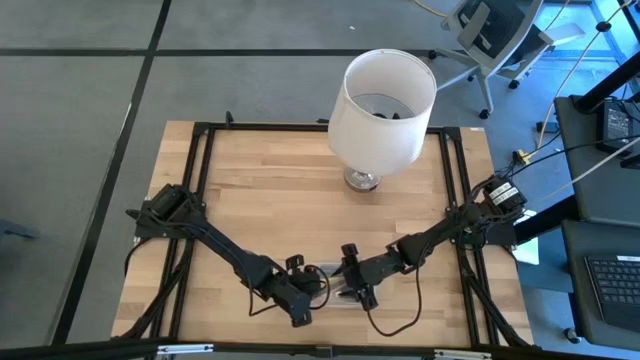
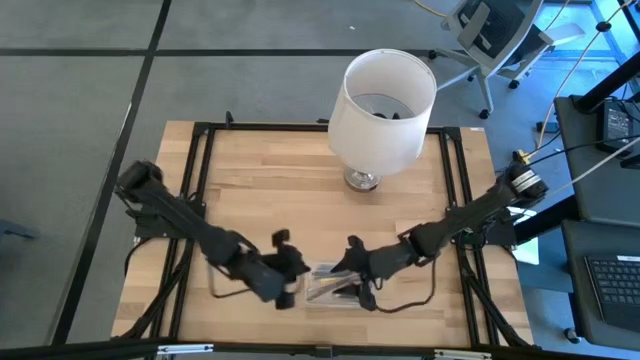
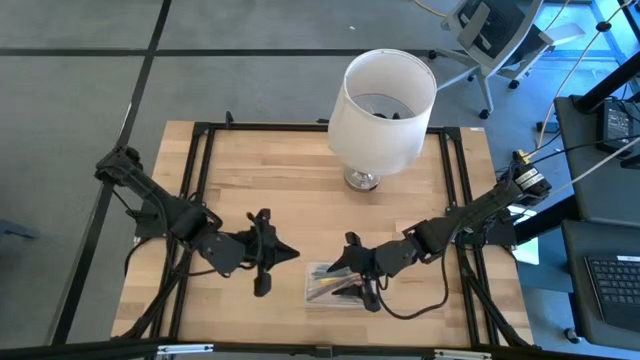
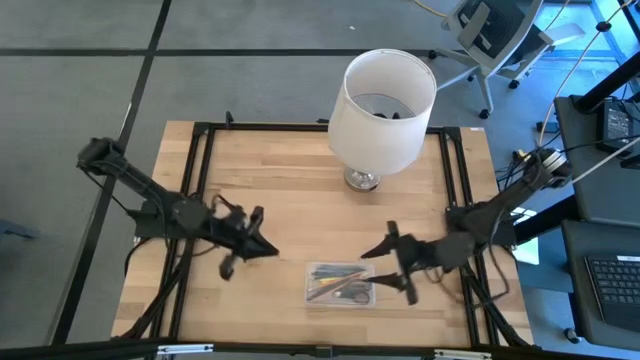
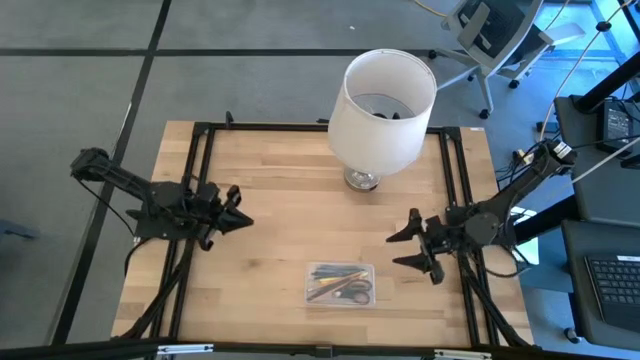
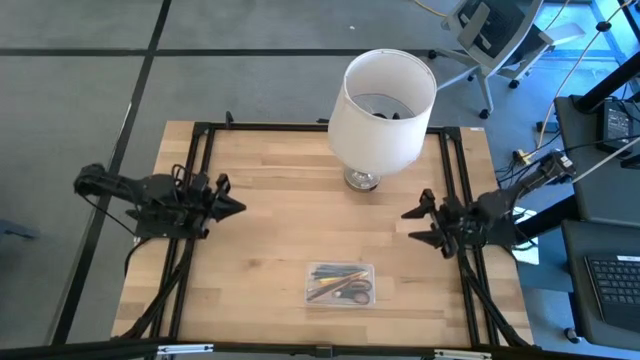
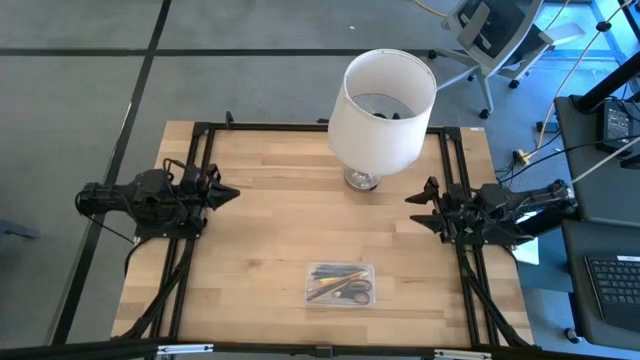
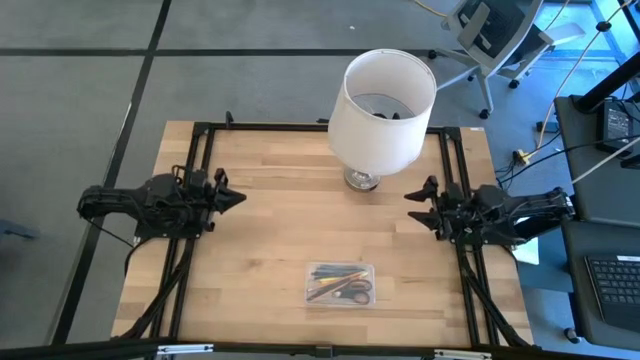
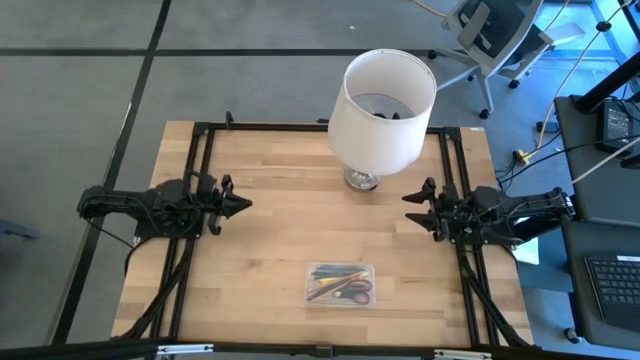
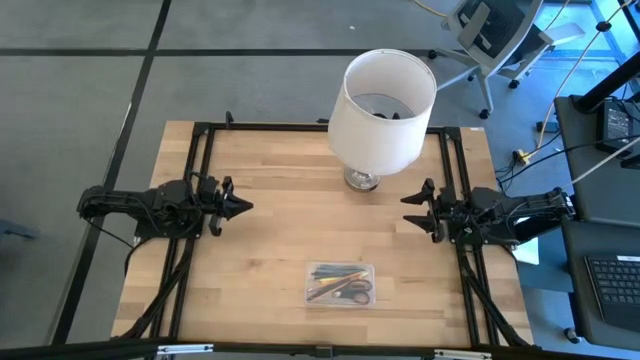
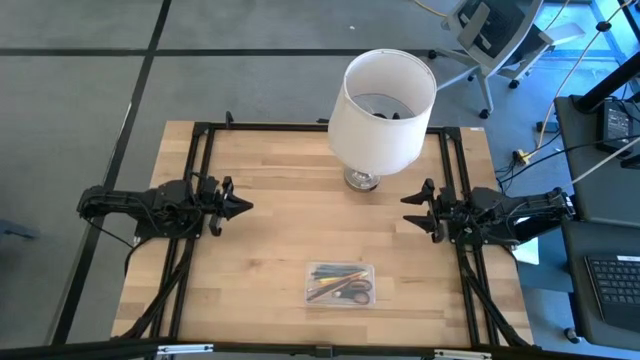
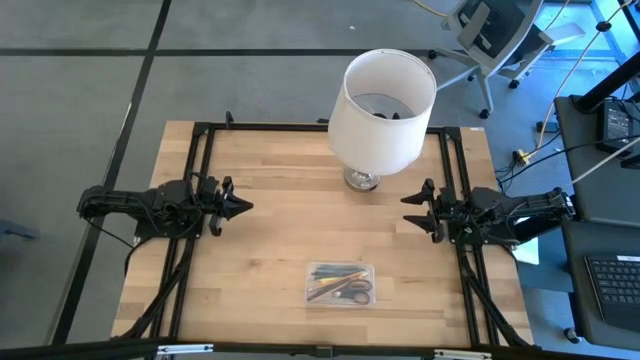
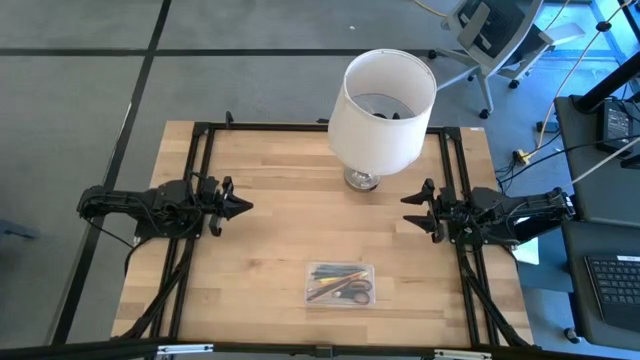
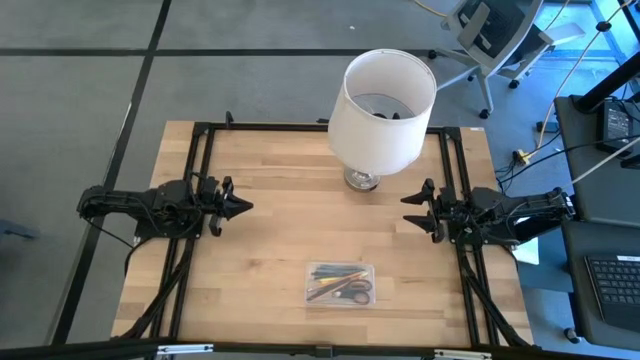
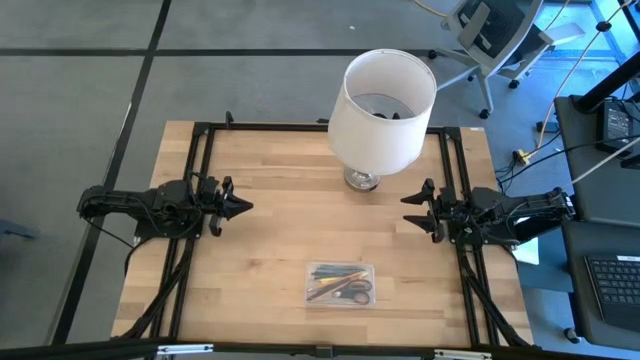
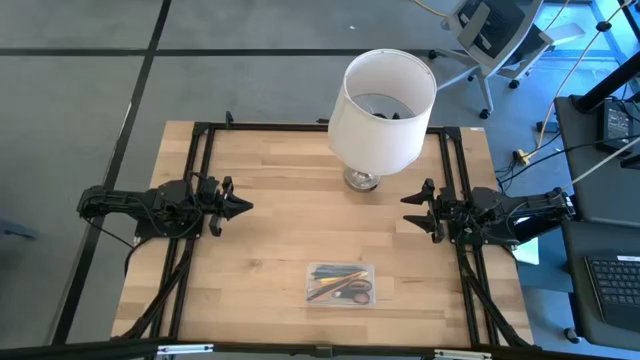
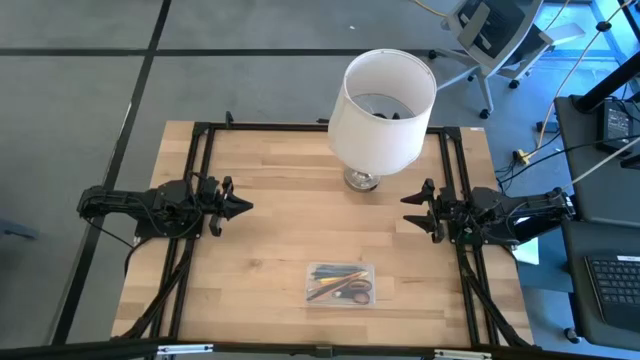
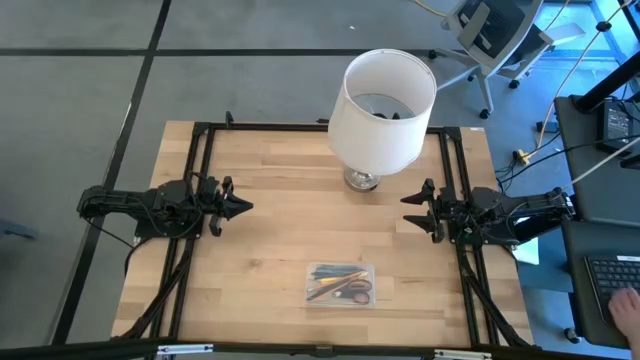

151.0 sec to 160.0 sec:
Task: Pick & place school supplies into a supply box
Return to home position

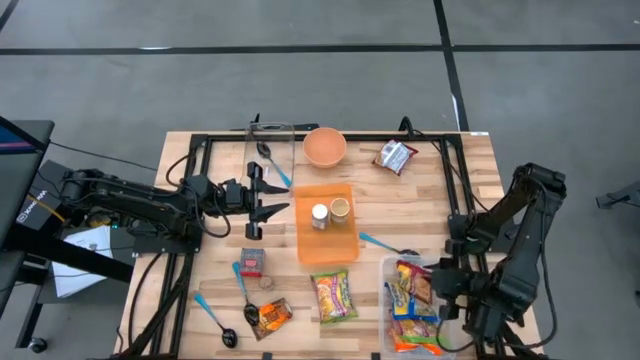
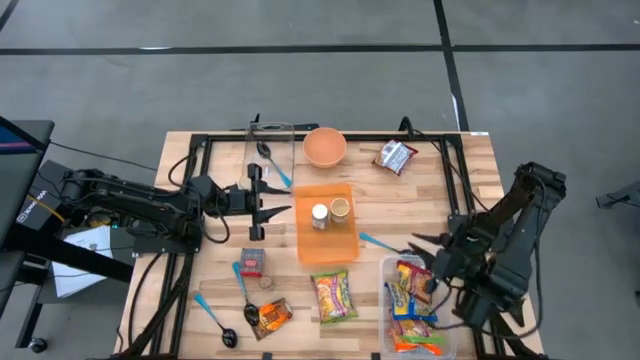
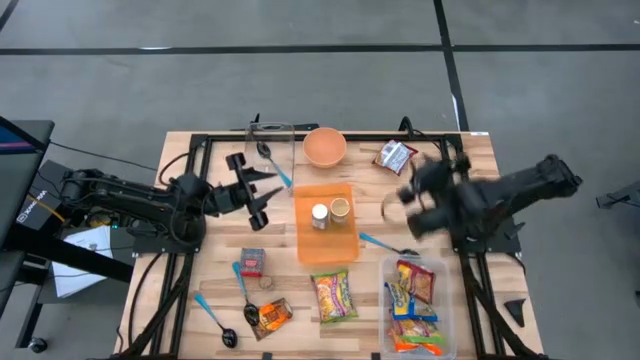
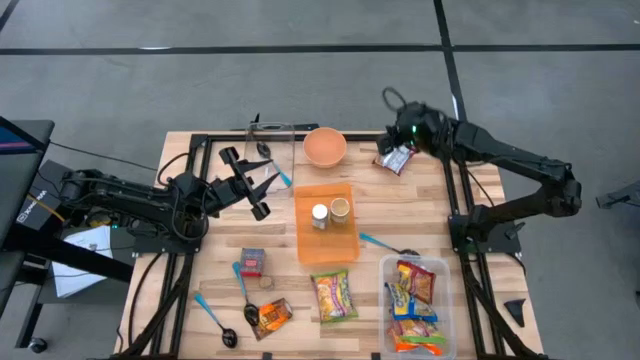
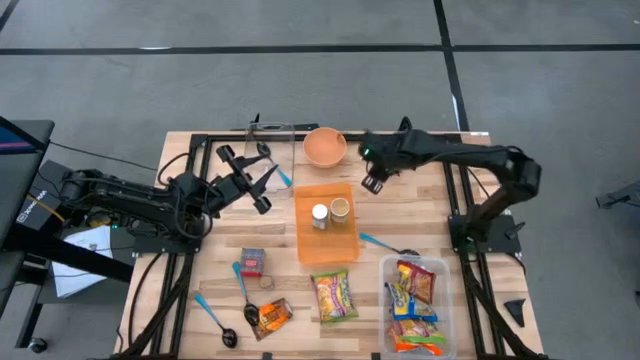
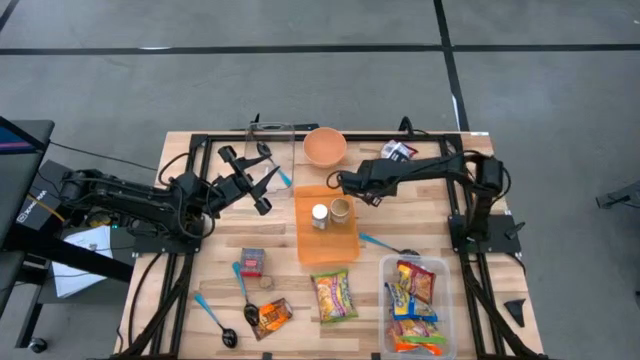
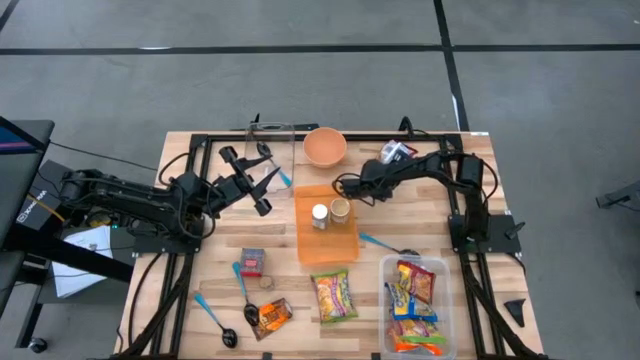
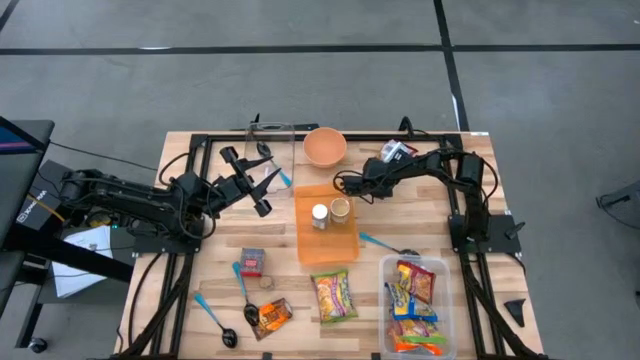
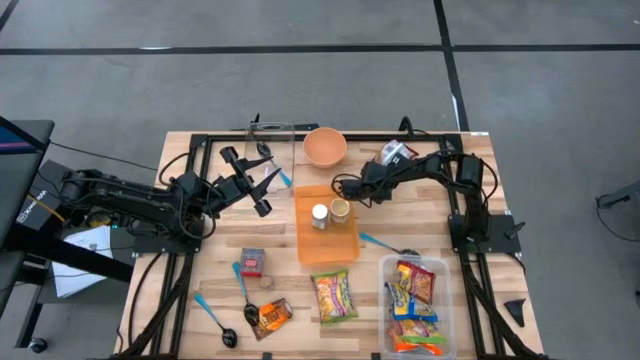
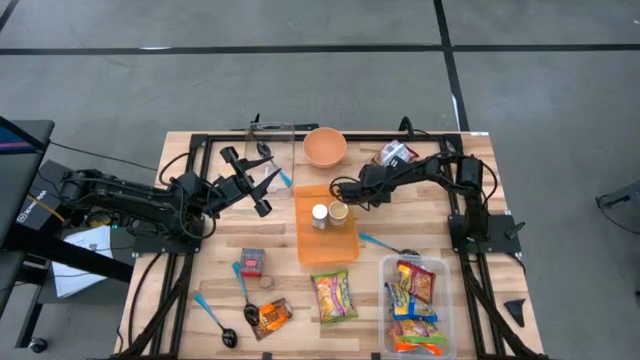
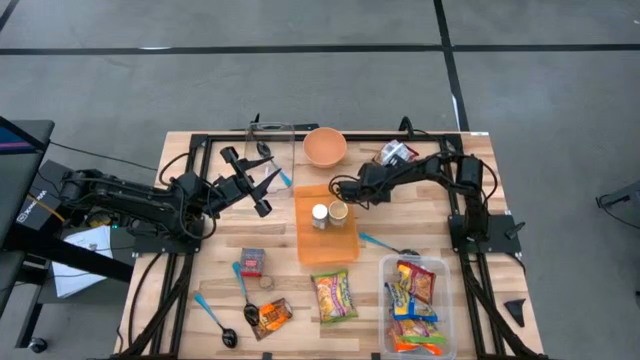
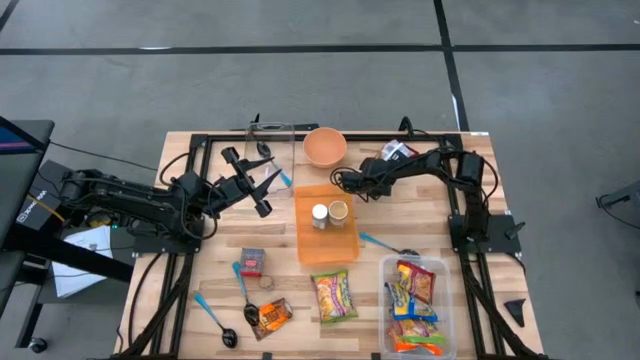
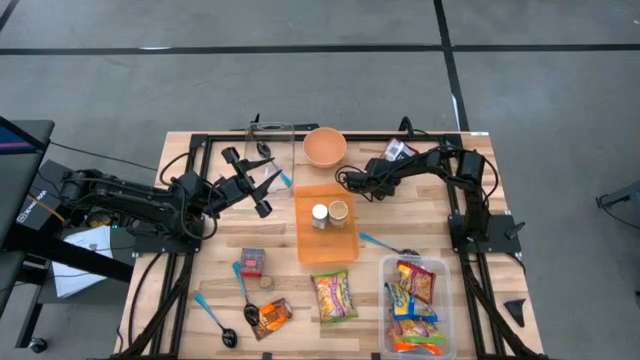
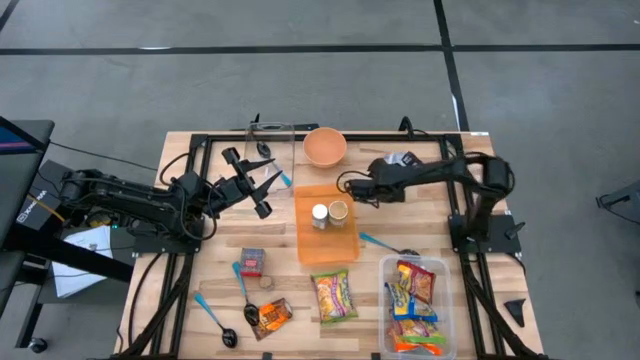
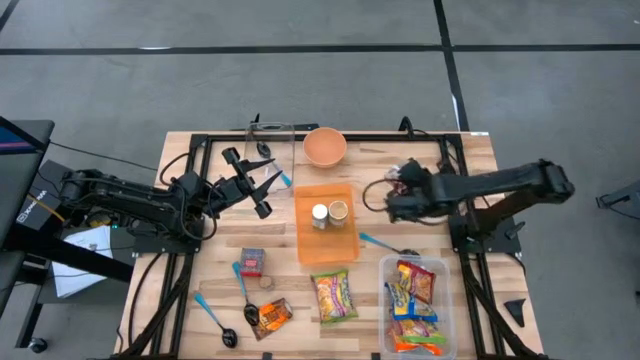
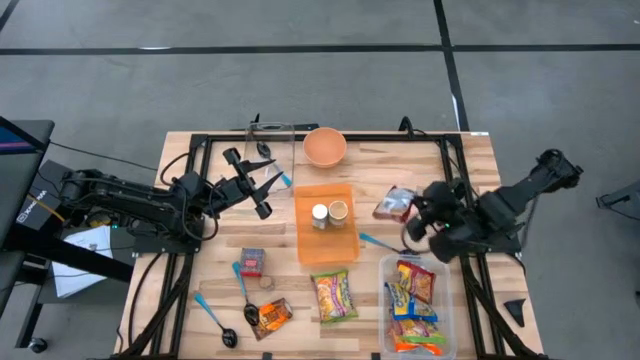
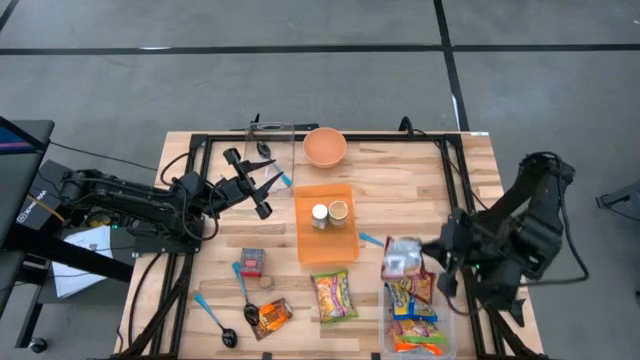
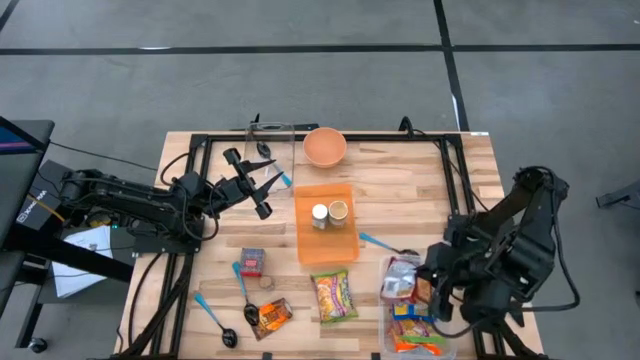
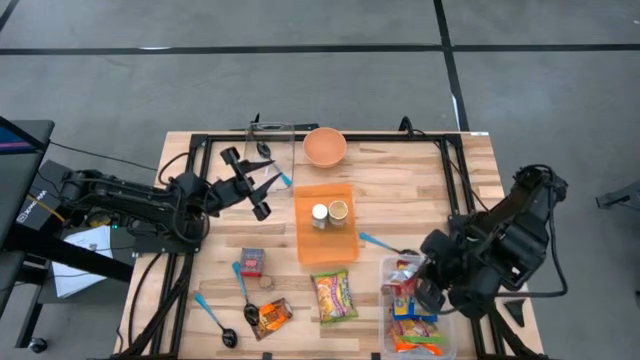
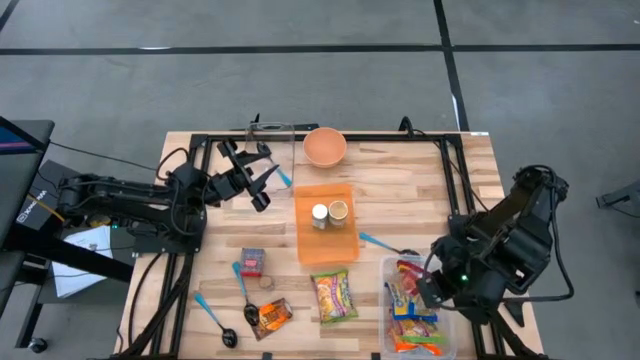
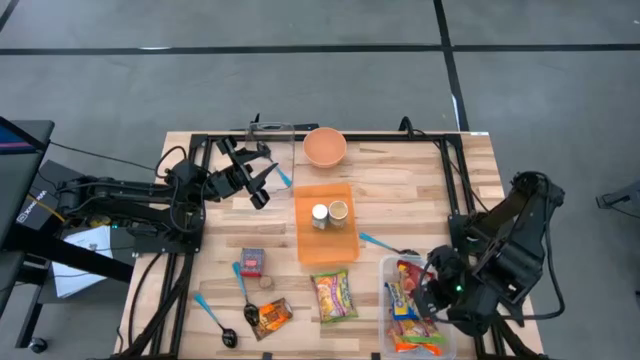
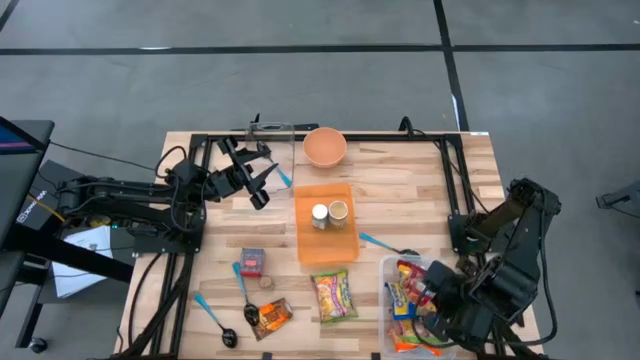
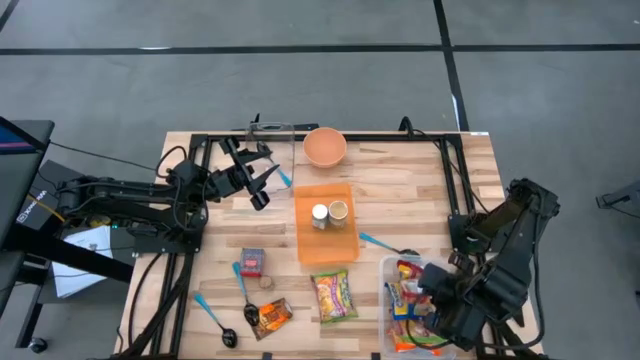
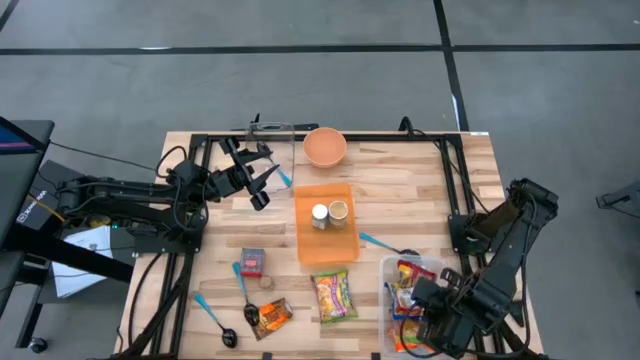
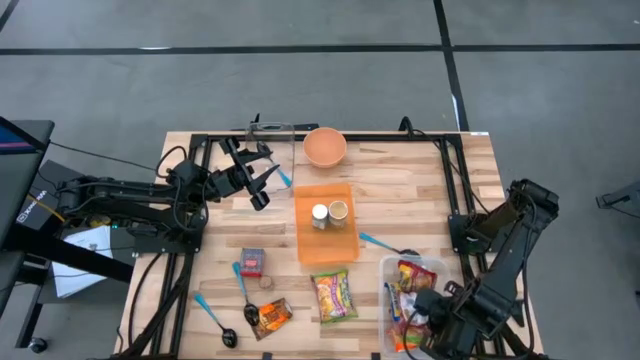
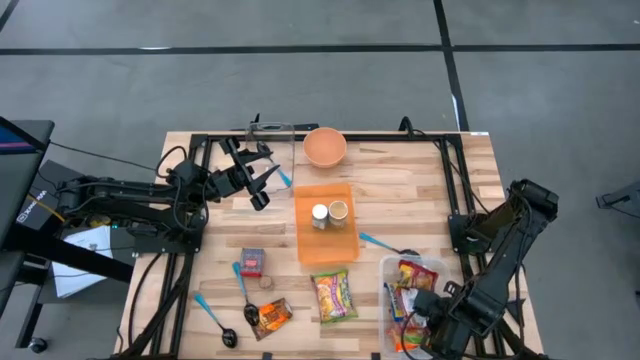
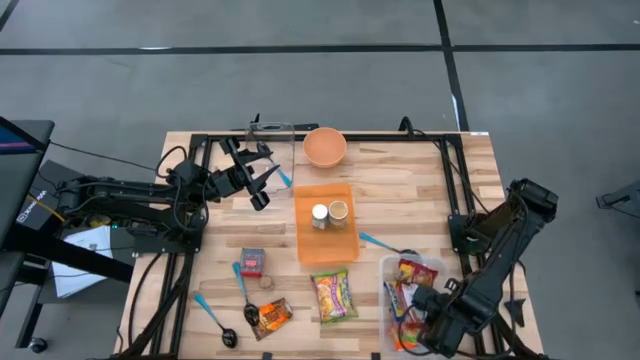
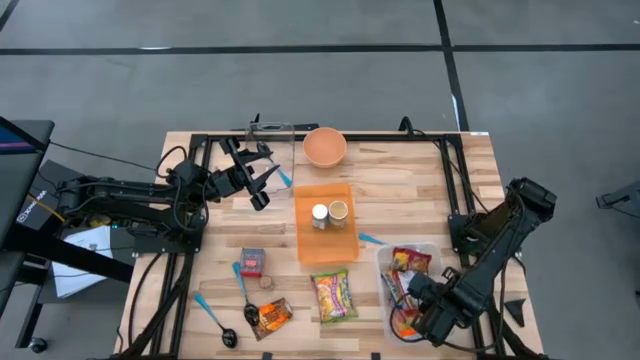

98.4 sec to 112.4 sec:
Task: Pick & Place Food Item
Put the red noodle pack into the transparent container
